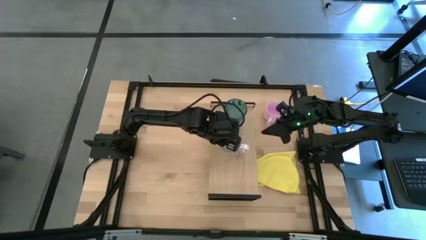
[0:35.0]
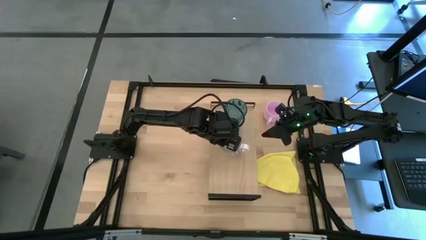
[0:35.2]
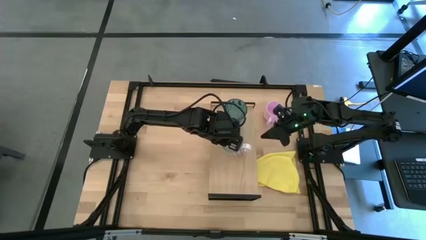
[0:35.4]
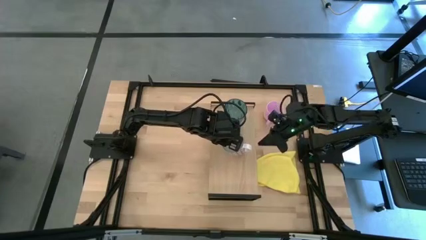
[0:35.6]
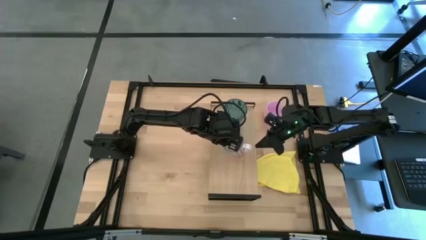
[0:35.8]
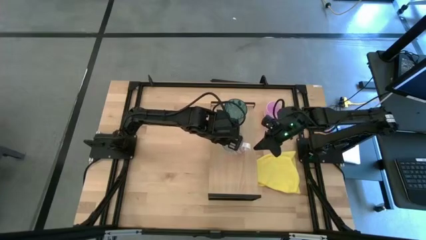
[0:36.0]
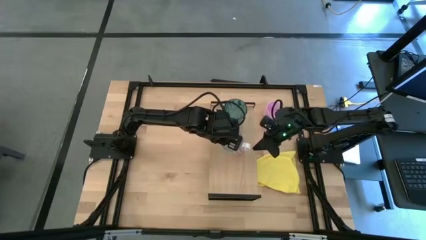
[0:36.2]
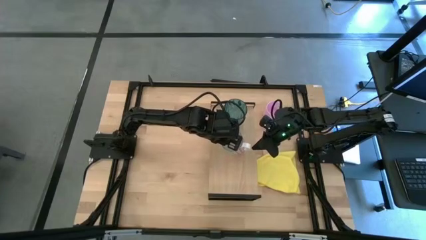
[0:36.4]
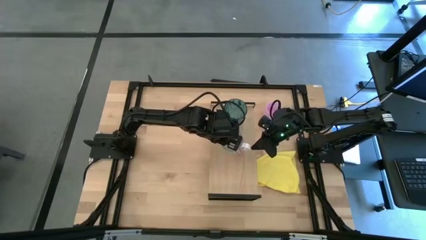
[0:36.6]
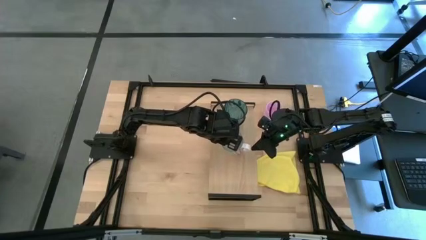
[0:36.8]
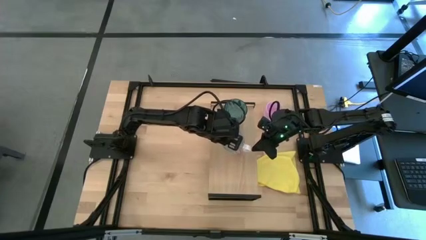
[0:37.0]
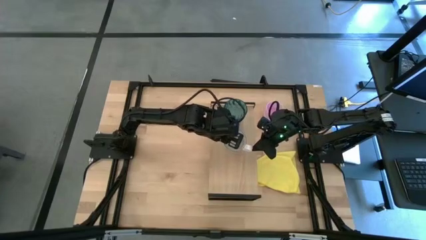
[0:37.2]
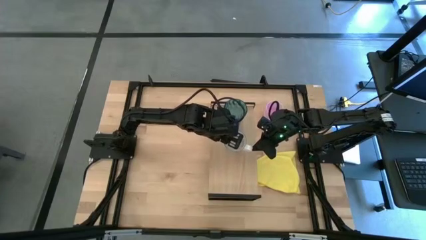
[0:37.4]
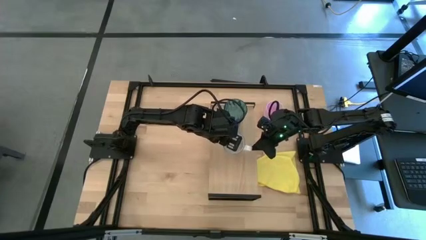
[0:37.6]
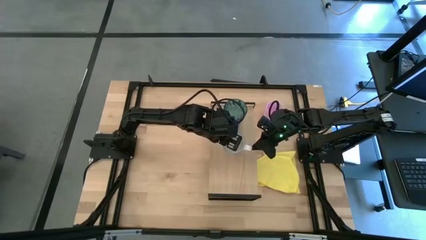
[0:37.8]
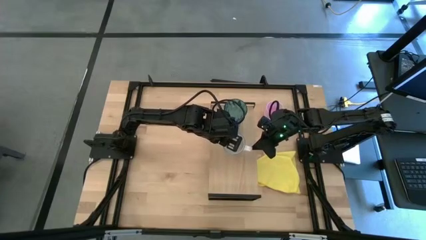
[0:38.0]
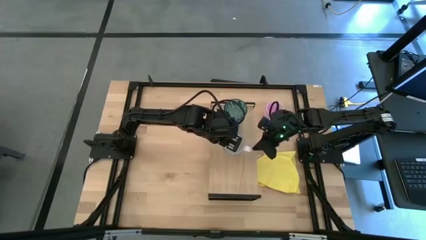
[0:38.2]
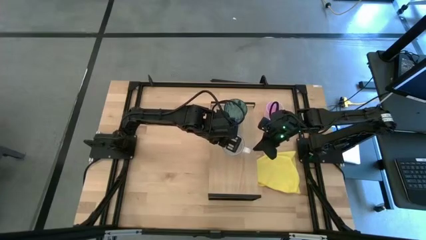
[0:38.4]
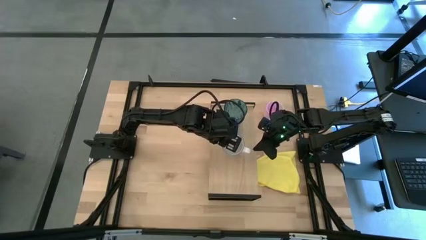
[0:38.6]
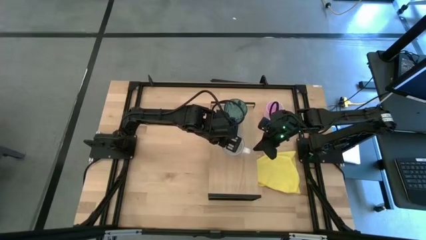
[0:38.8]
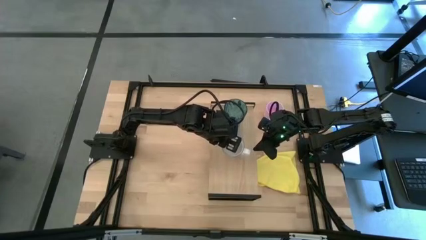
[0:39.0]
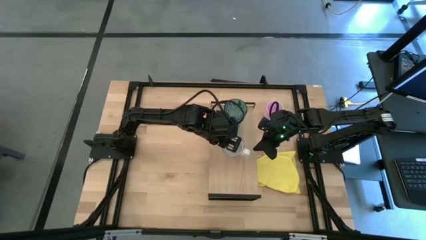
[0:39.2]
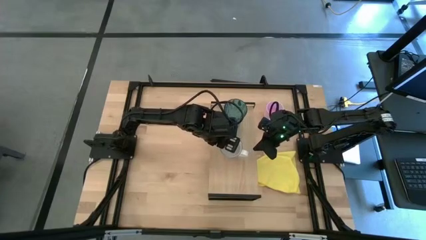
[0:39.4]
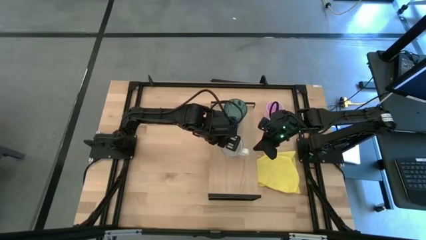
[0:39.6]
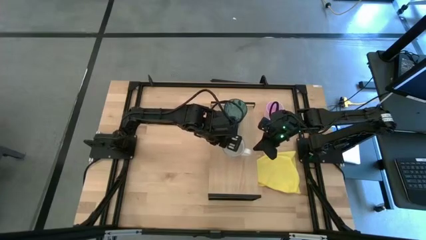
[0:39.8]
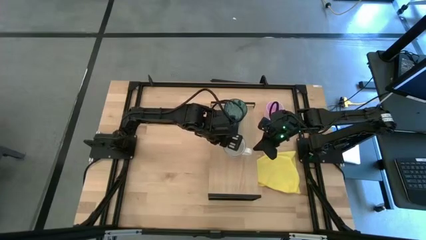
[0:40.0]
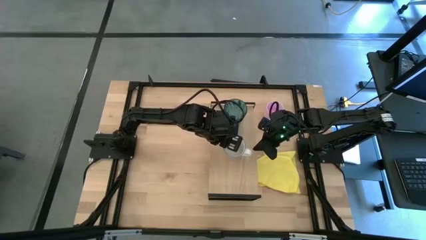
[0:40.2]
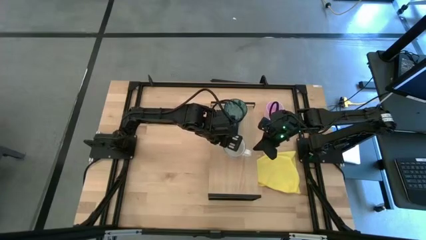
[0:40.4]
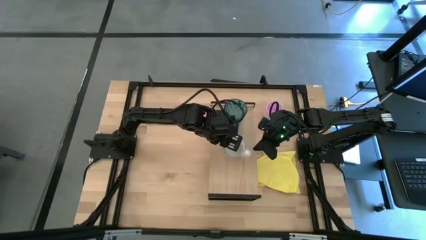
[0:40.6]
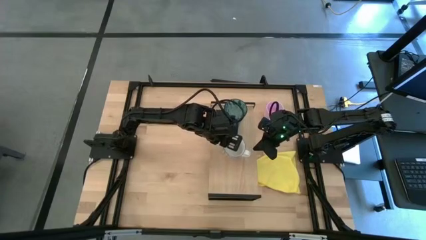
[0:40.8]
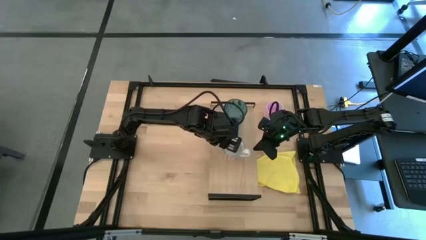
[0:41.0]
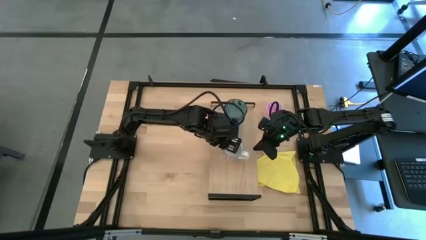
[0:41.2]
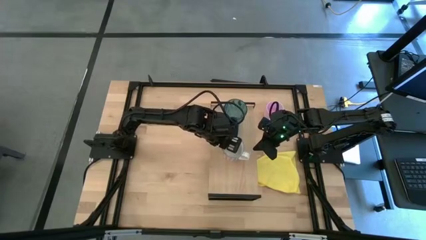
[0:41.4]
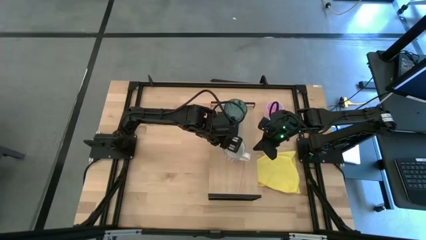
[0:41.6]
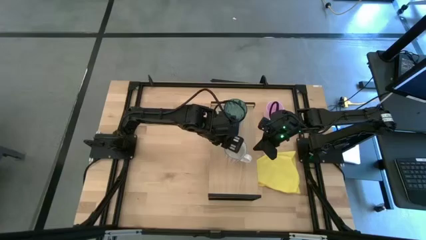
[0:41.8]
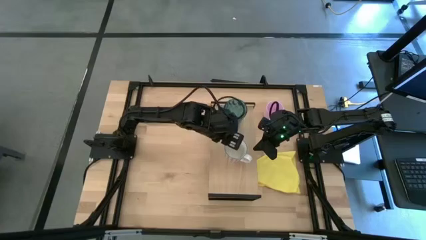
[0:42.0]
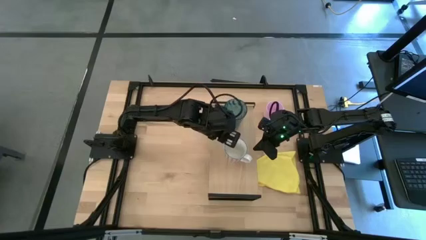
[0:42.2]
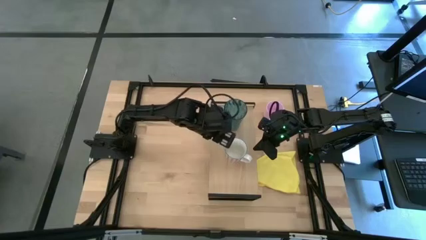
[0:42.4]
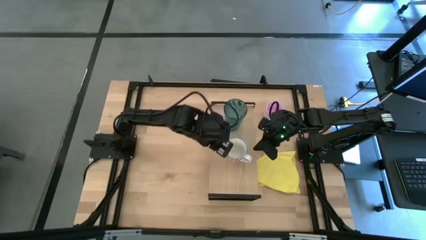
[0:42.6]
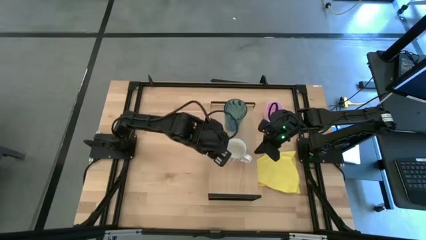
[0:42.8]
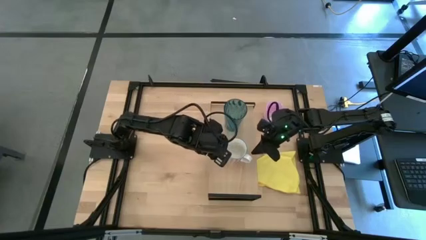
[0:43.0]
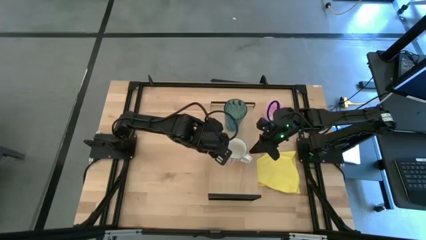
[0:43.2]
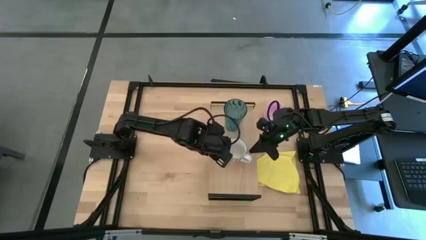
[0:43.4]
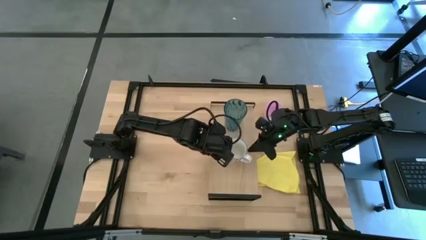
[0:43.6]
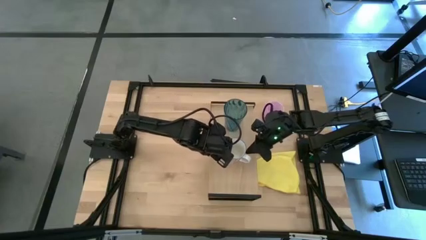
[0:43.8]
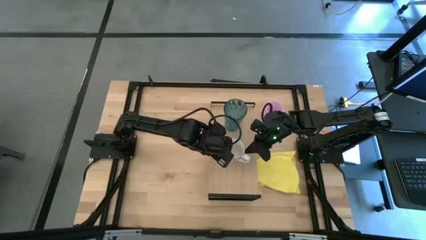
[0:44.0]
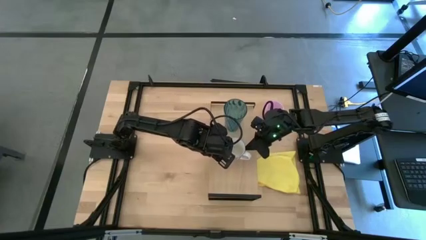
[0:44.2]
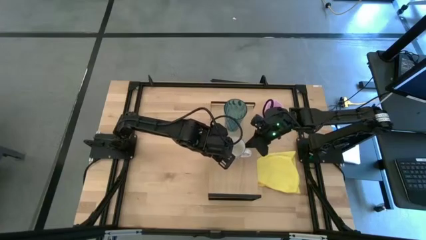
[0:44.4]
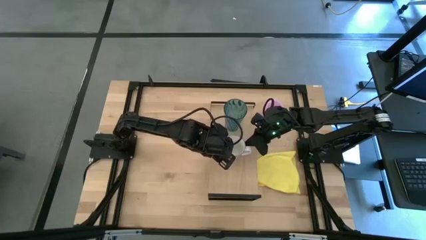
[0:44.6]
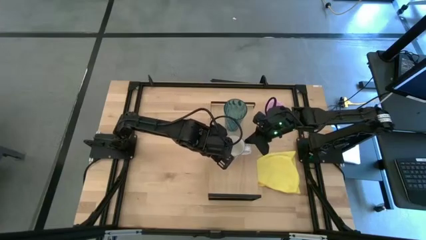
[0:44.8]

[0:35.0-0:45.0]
Task: Stack small to large cups/mugs on shelf
Put the white patterned mug on the shelf
